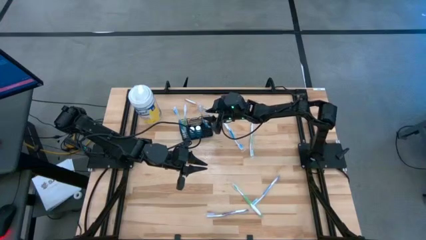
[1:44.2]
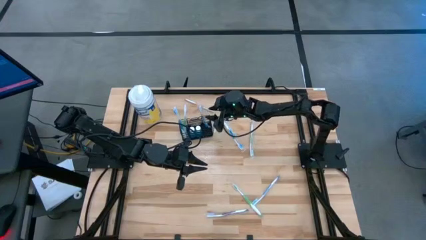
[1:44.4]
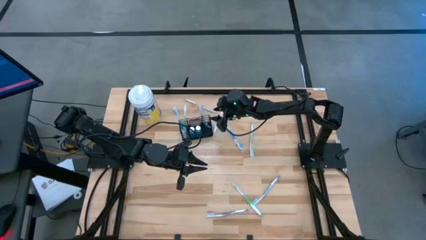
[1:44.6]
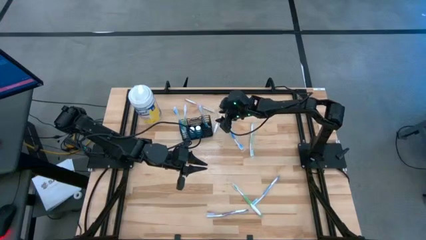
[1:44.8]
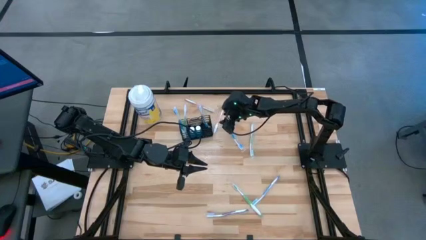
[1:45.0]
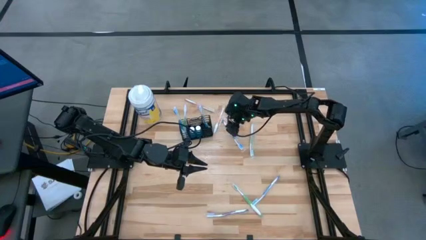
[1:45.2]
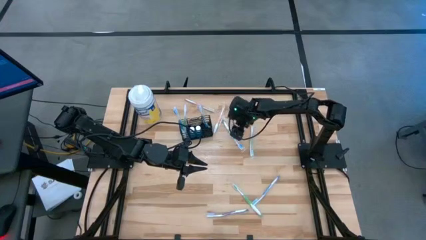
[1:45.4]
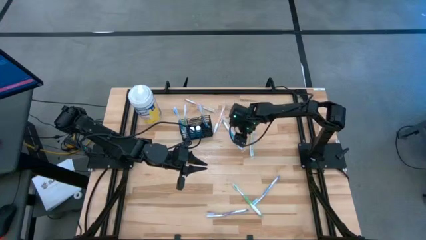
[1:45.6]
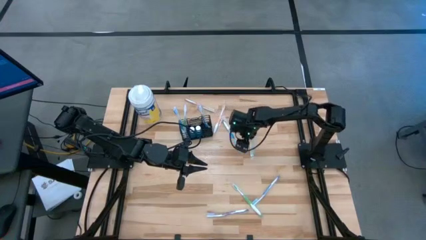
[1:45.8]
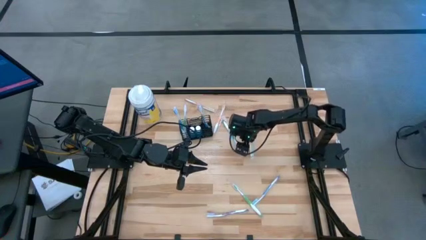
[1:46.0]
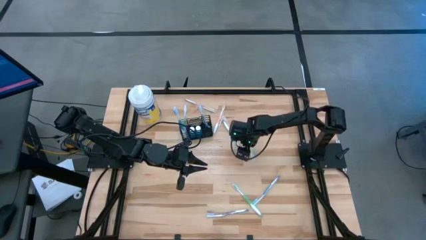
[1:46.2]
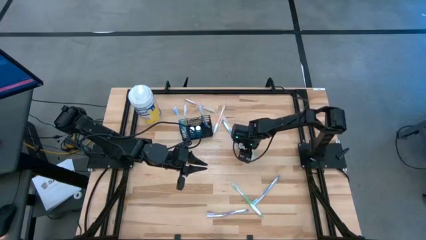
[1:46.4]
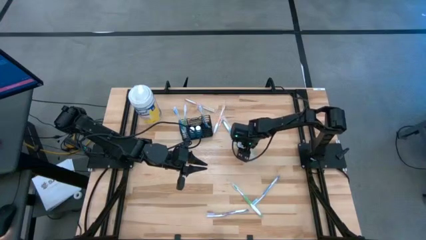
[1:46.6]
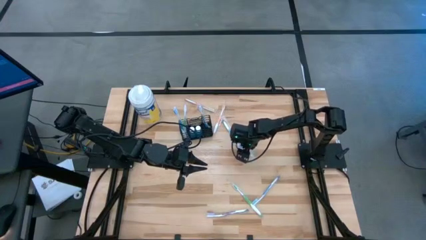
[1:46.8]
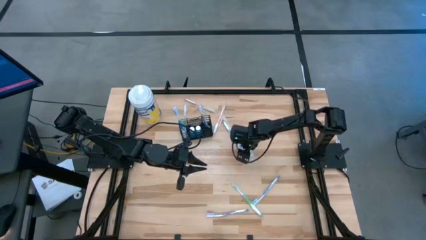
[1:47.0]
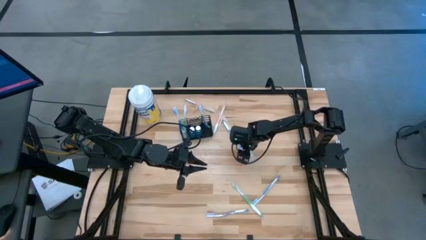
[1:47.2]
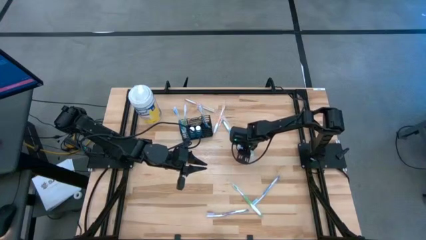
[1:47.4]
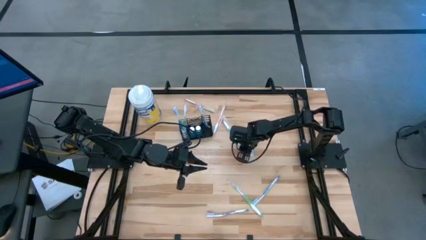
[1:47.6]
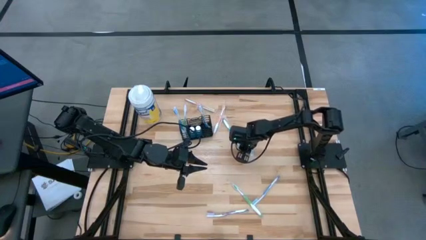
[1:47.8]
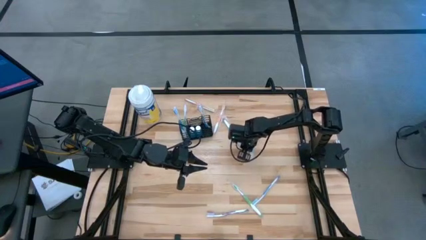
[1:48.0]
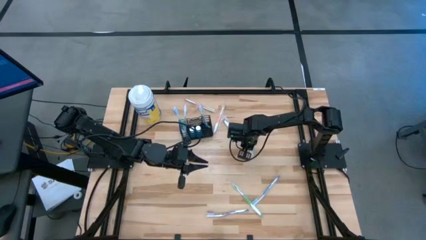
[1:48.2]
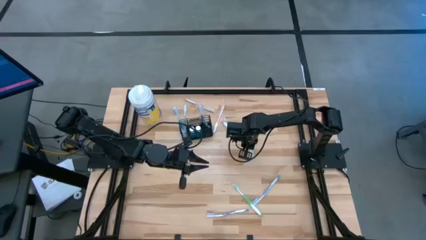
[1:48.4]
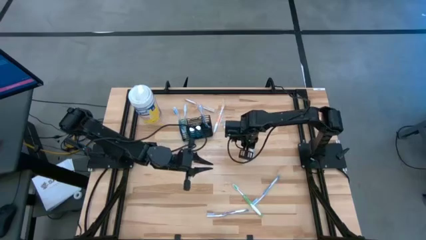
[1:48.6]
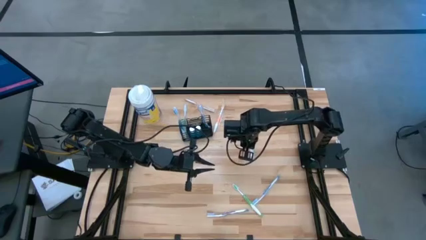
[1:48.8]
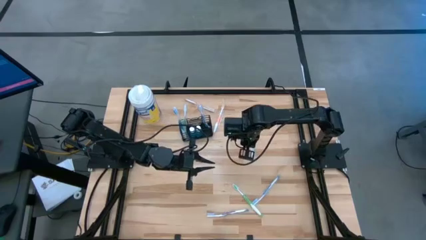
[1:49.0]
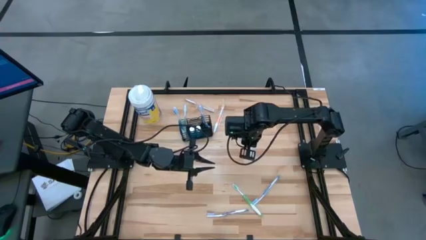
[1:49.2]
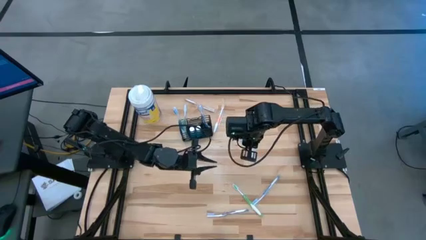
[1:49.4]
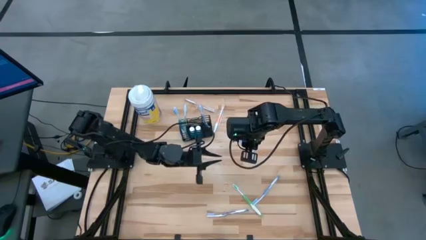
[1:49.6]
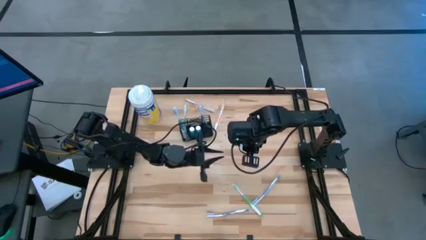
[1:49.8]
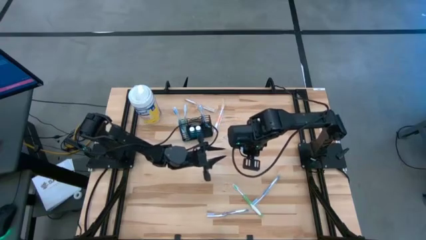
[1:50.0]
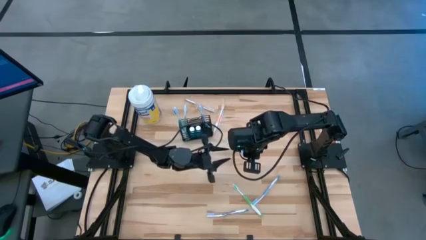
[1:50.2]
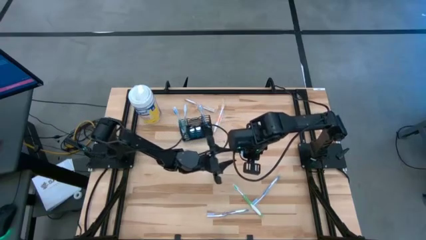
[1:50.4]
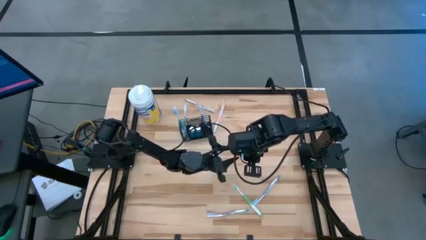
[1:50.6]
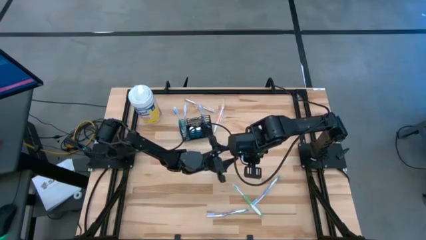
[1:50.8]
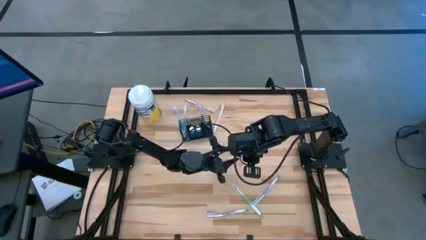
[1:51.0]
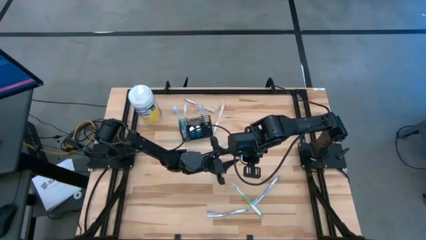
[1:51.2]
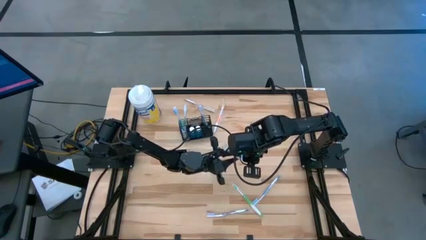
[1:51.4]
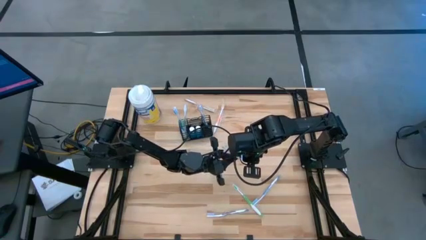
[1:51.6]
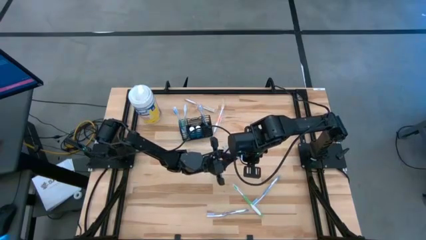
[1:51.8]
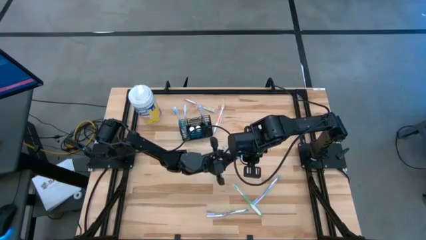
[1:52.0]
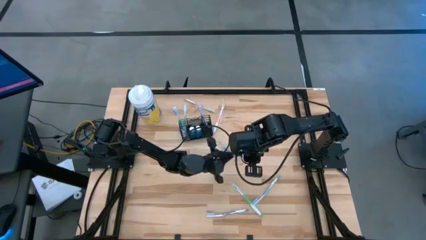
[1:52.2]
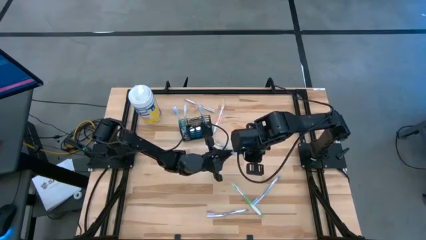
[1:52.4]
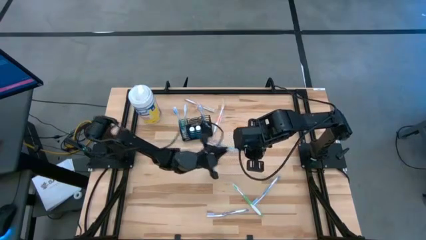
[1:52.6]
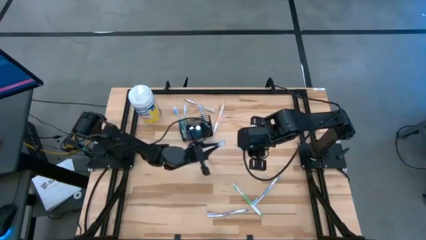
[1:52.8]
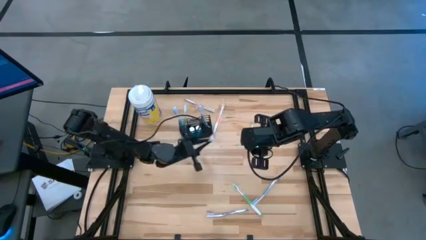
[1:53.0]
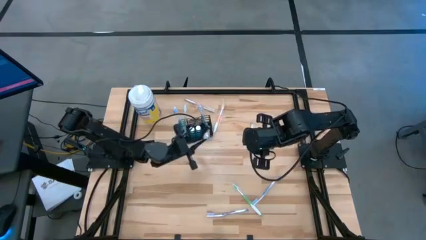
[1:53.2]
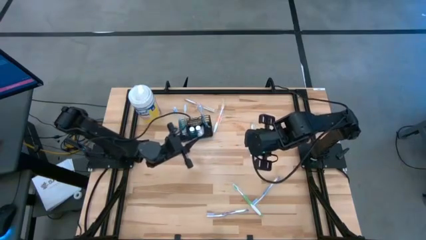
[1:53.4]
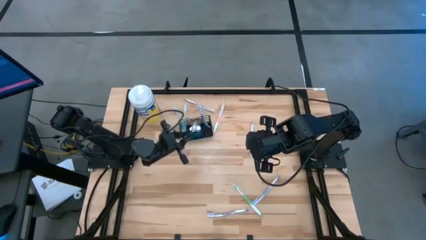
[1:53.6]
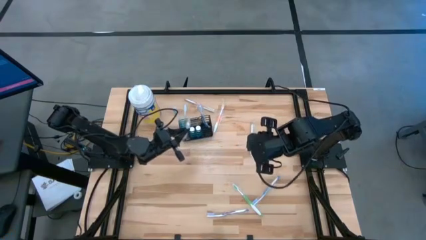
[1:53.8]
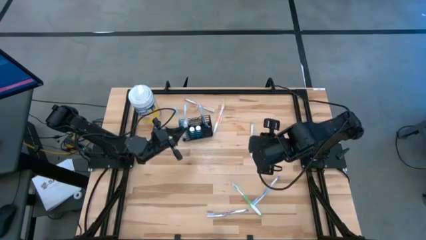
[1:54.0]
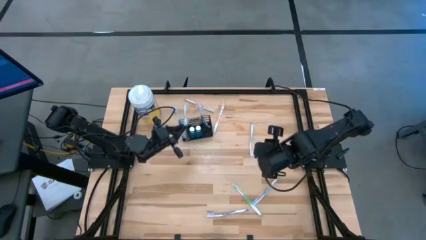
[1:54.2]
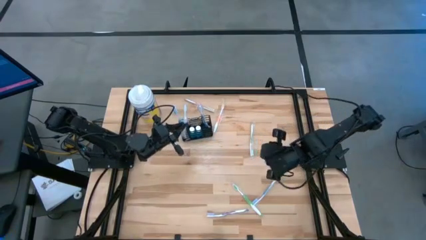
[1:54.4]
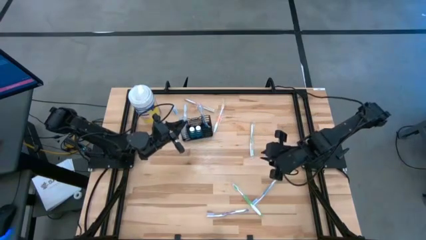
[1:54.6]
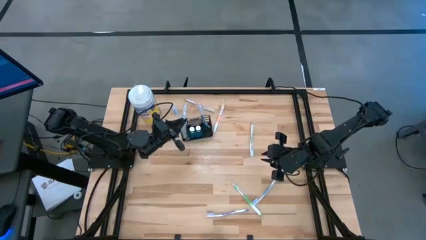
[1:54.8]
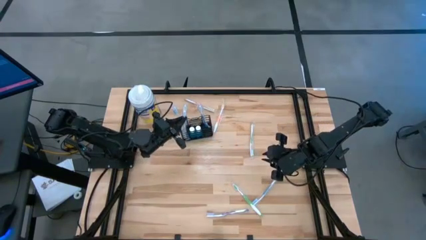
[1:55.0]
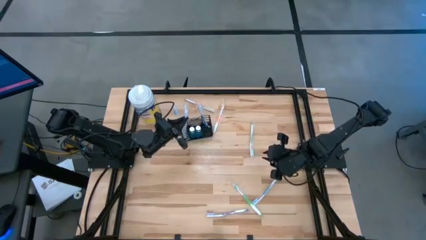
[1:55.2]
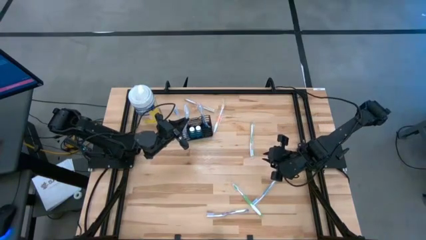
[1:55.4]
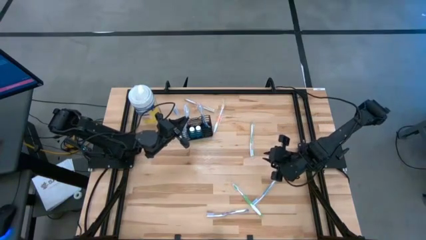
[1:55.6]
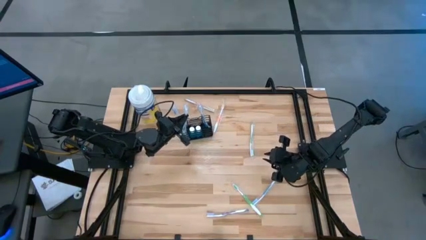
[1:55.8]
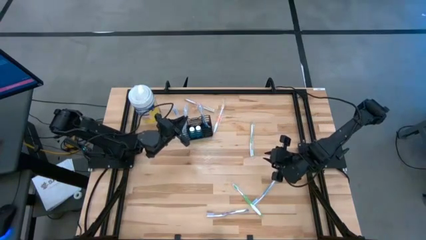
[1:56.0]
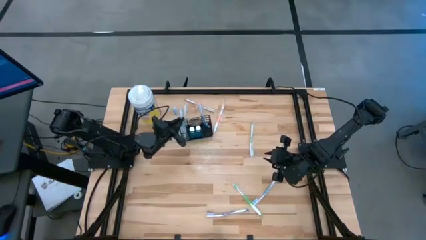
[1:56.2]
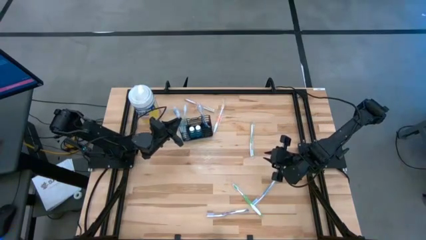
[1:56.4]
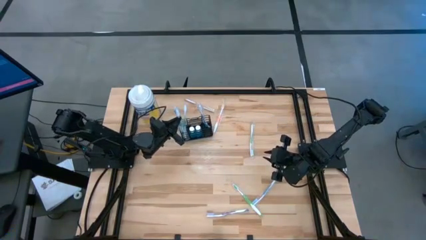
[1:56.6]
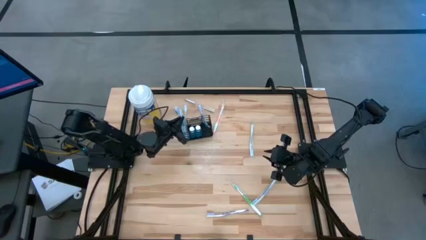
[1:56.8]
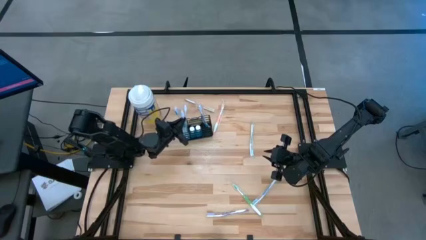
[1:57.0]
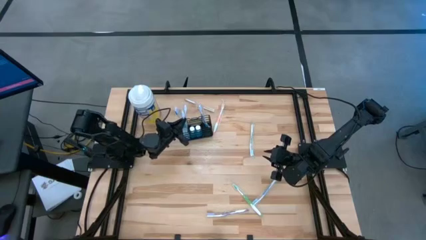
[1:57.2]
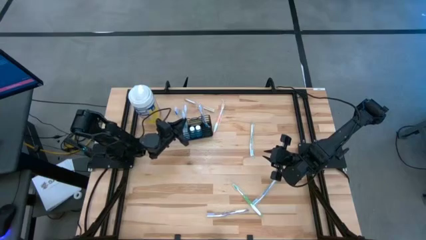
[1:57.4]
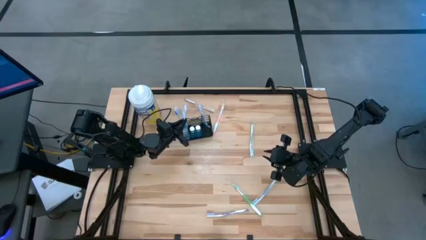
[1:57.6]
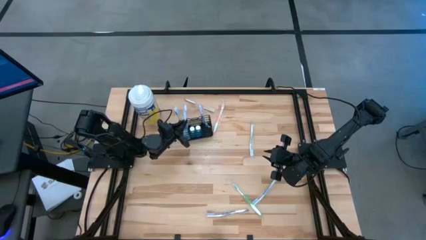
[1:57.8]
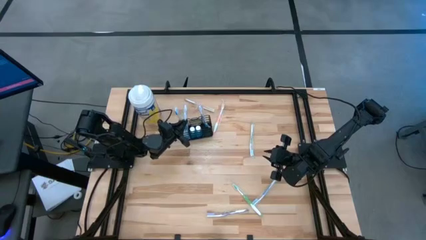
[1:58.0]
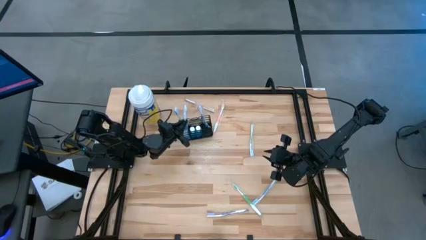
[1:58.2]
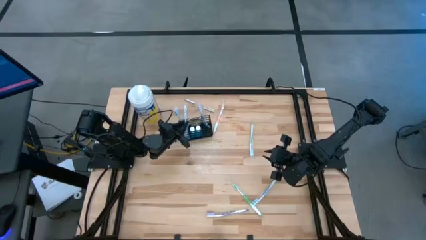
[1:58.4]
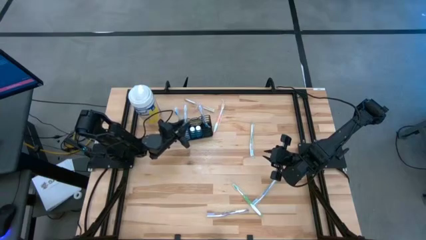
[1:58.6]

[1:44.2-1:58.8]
Task: Pick & Place toothbrushing station
Put the top blue toothbrush into the mesh organizer
